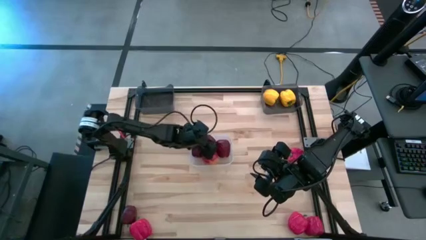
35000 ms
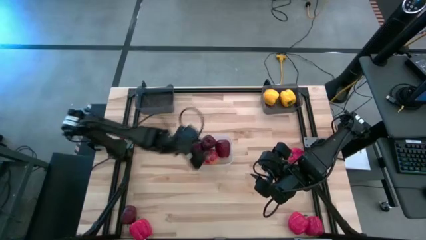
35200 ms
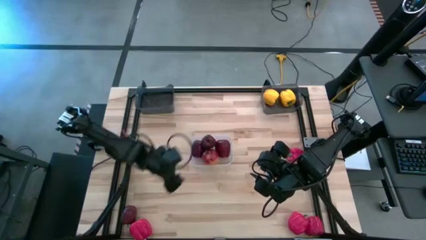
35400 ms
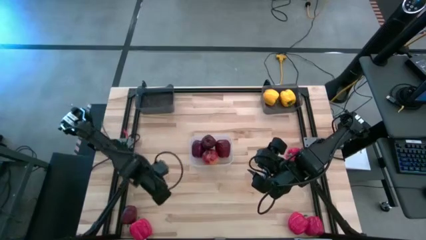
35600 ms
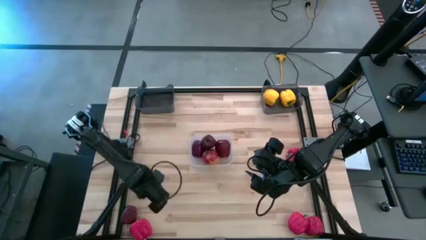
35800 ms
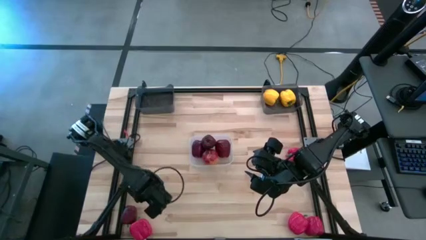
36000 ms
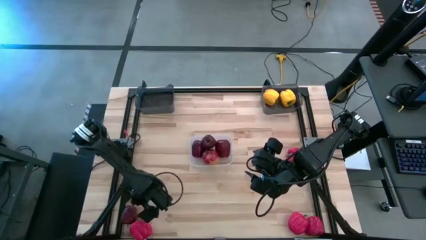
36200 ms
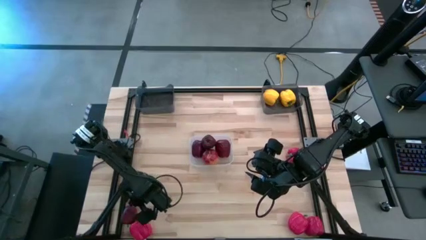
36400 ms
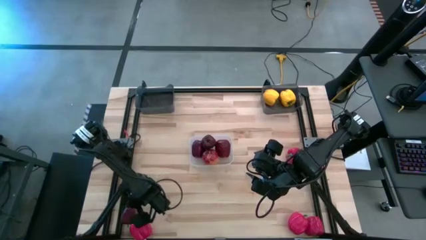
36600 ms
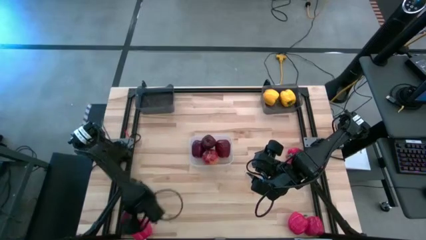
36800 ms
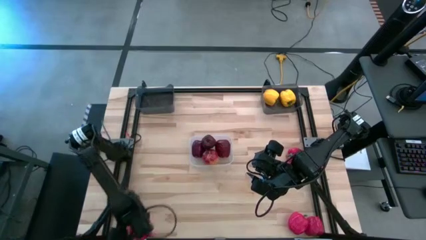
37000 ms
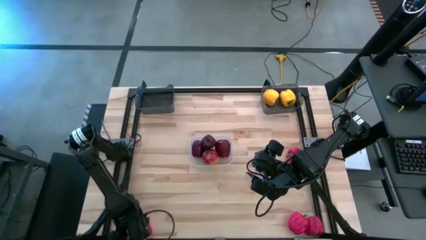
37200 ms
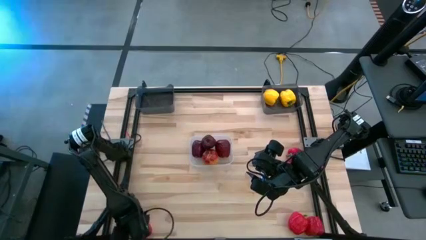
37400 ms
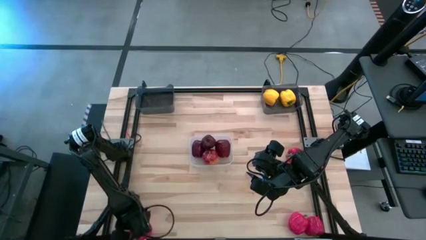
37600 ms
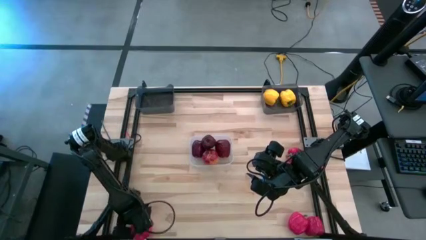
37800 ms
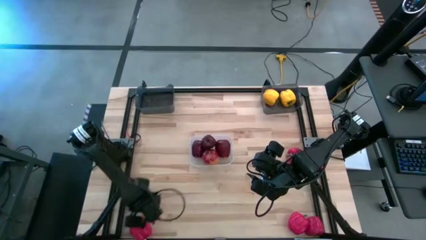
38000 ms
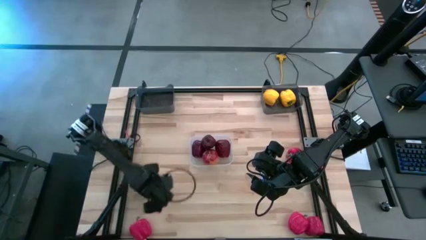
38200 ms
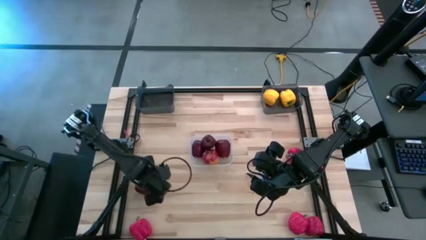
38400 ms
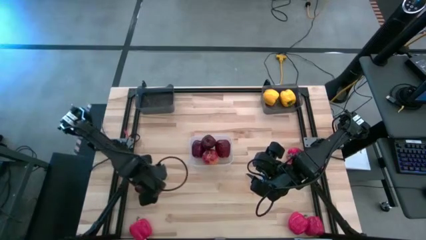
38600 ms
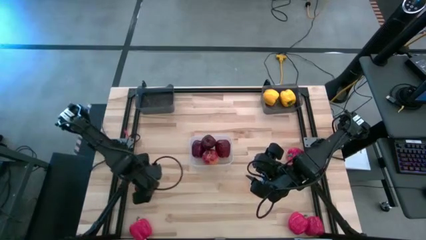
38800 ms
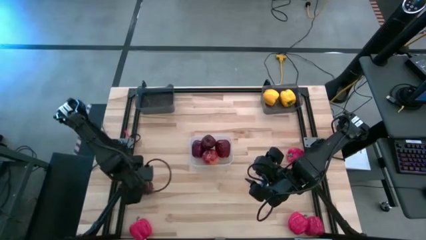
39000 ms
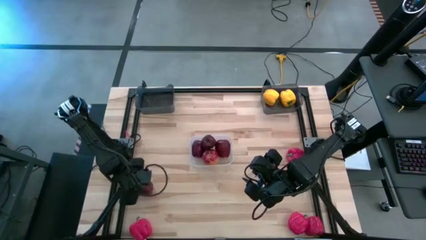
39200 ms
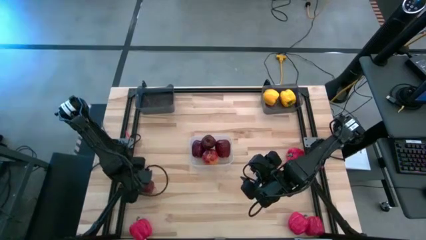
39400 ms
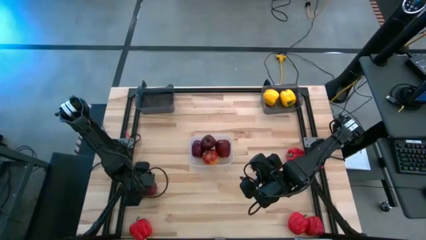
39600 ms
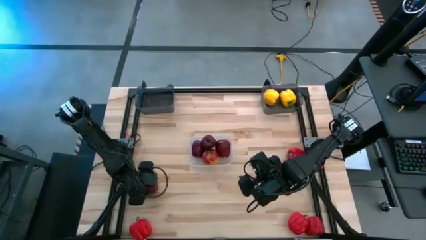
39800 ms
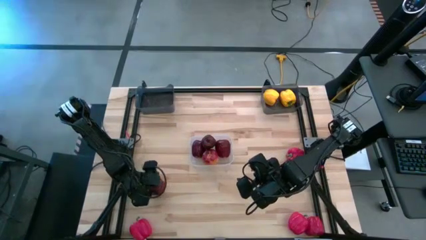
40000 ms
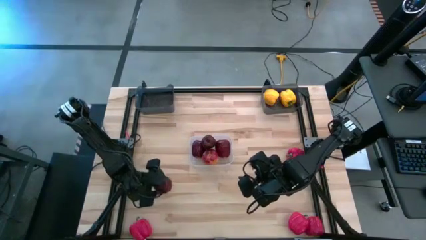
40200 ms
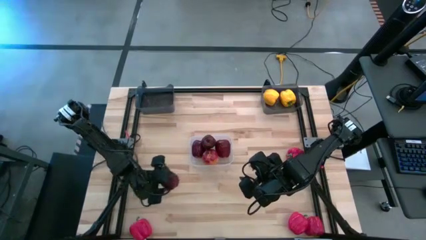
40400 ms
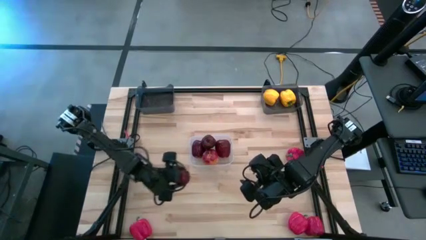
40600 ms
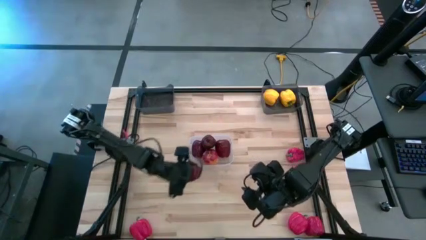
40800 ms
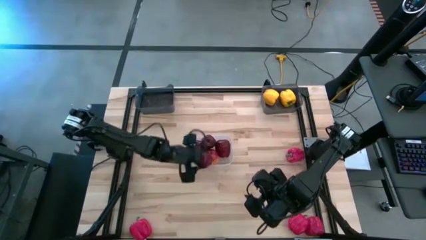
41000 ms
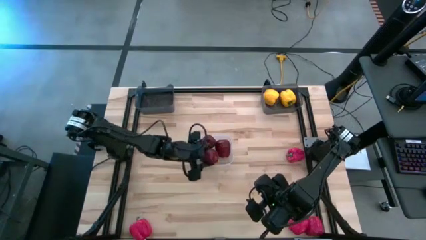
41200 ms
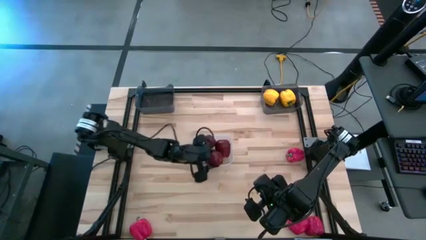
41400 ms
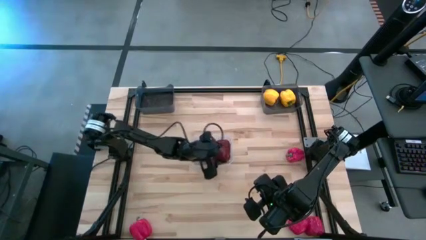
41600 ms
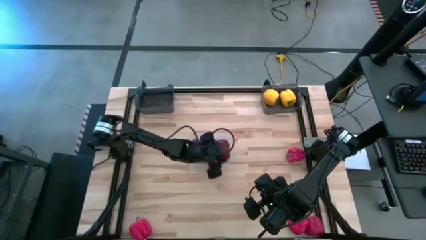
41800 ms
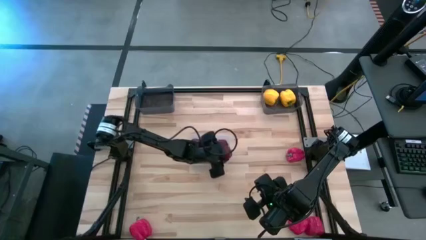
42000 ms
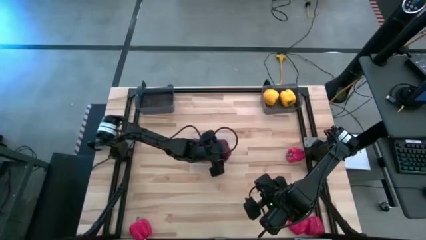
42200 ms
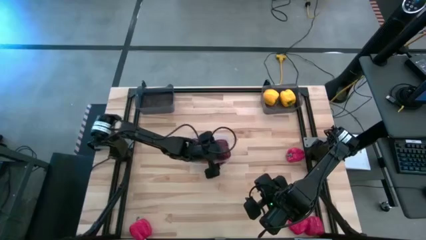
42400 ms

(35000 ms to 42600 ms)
Task: Sort produce into baskets
Put the red apple into the transparent bin

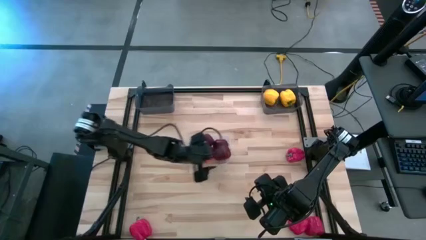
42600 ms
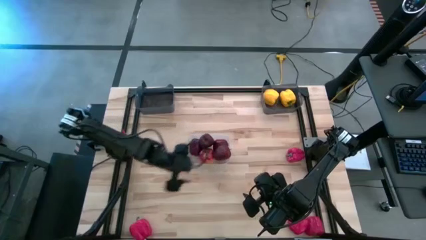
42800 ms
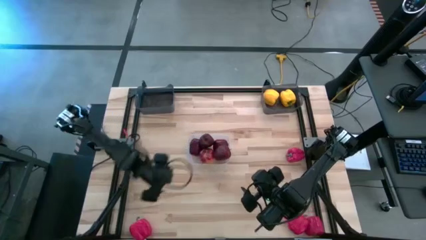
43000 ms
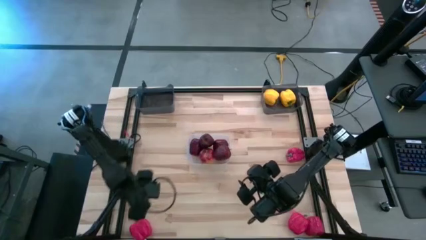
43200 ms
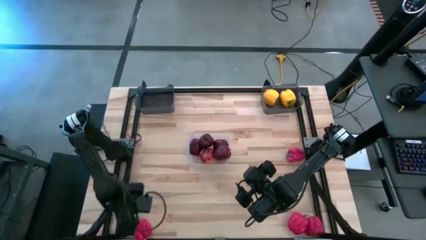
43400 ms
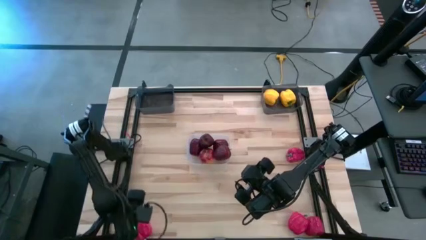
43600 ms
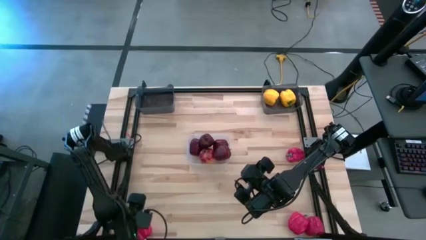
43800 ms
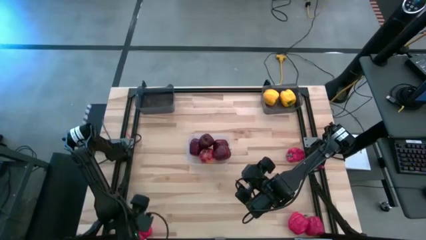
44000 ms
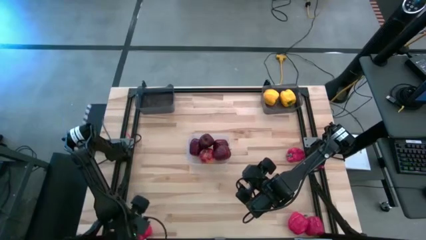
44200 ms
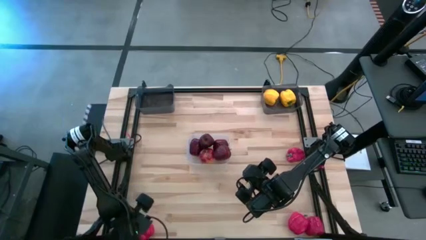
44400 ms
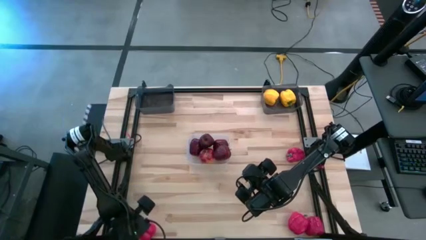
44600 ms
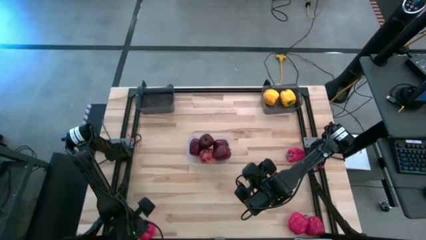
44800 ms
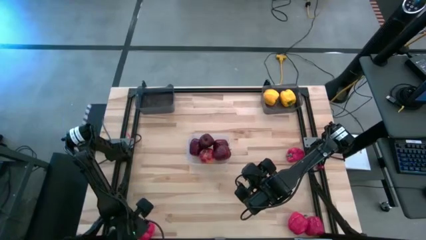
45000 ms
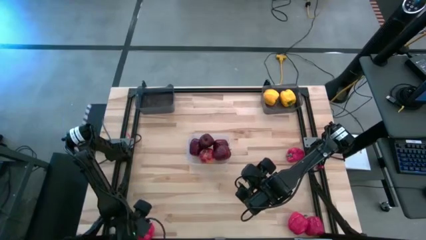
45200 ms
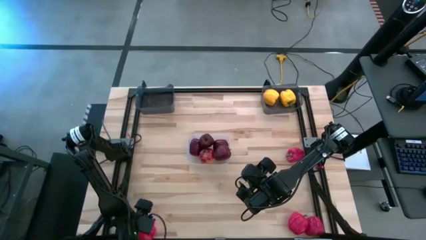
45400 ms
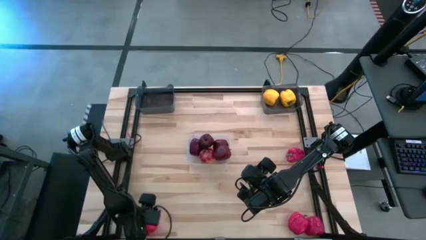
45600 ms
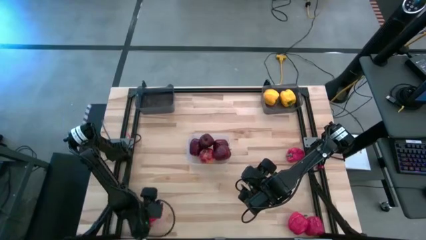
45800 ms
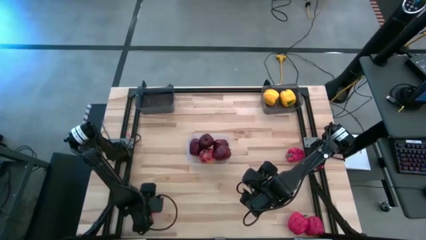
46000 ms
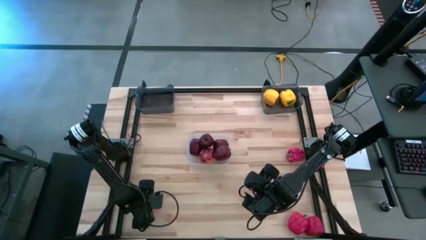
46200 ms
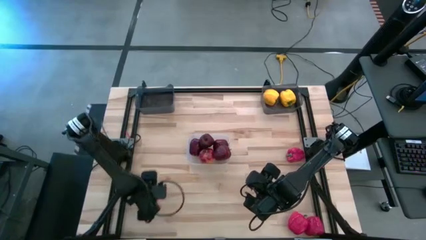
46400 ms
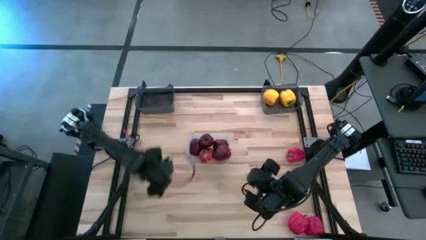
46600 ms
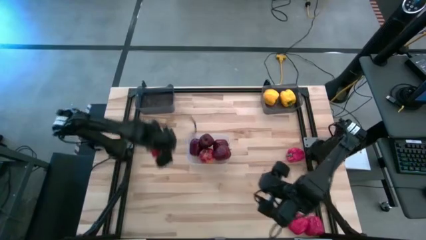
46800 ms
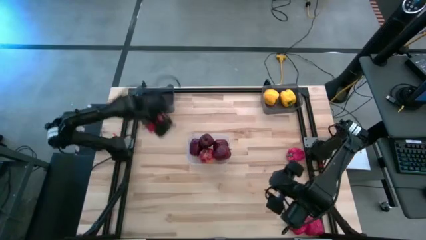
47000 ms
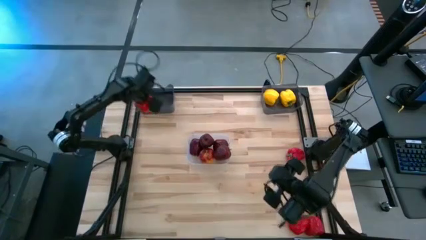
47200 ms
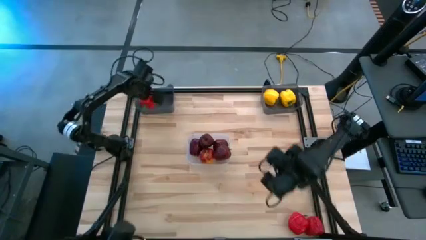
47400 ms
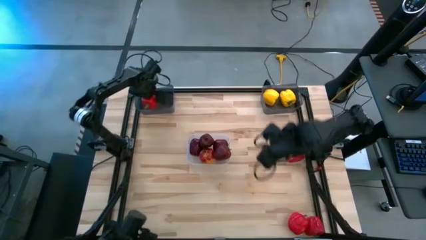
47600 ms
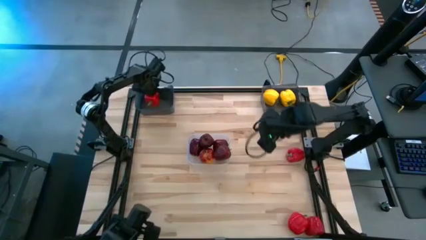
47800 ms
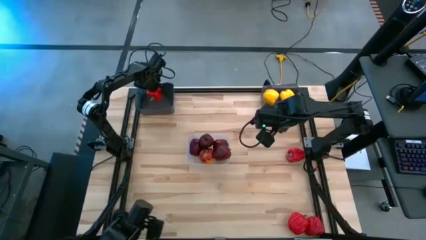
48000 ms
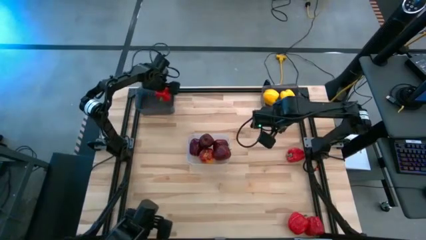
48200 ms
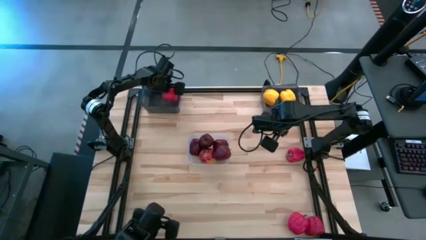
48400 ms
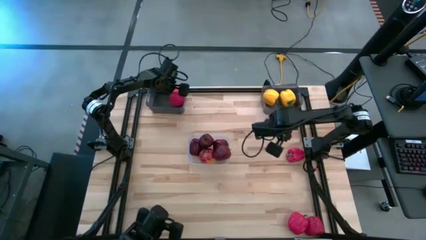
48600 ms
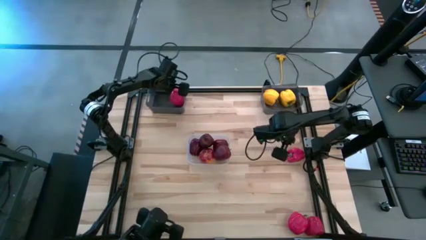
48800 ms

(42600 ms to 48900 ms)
Put the red bell pepper into the left black bin

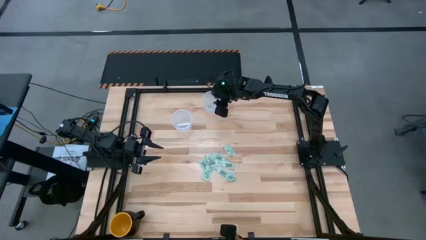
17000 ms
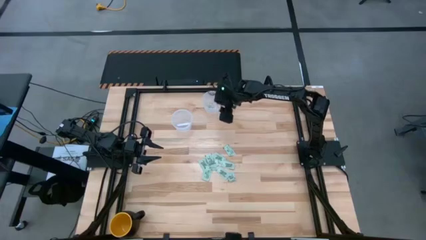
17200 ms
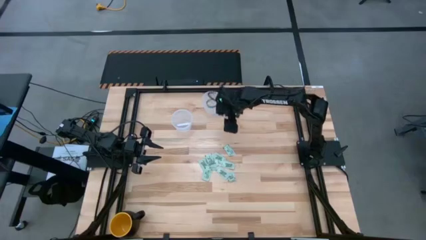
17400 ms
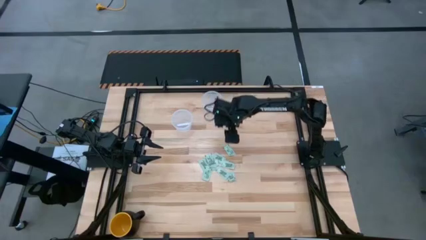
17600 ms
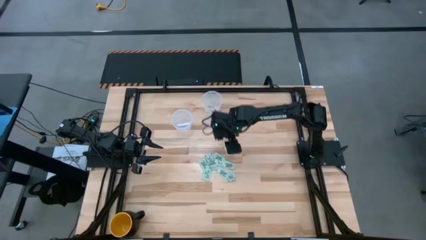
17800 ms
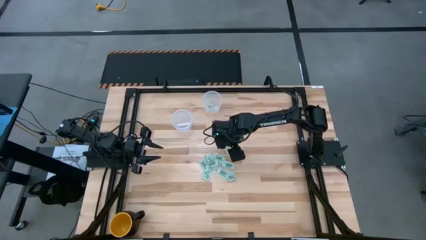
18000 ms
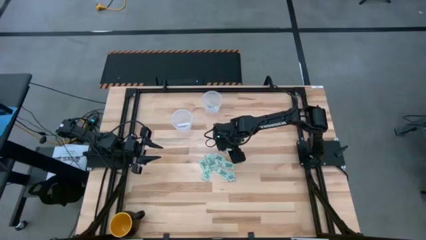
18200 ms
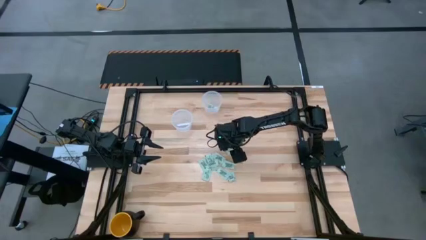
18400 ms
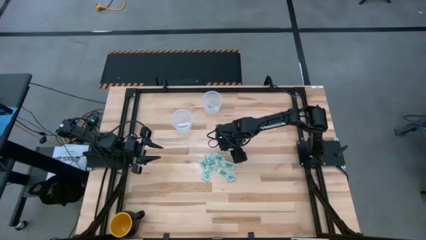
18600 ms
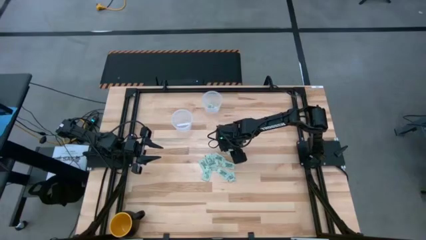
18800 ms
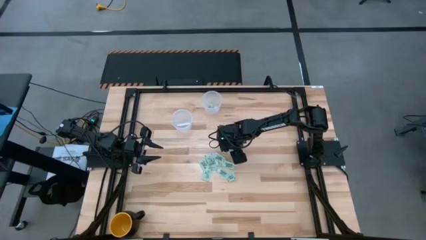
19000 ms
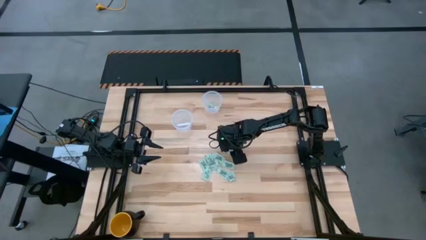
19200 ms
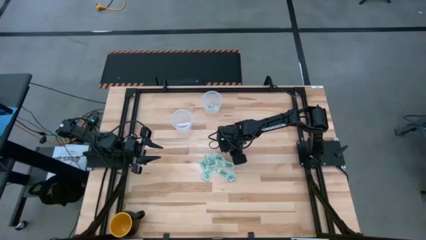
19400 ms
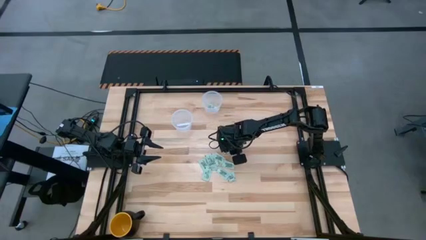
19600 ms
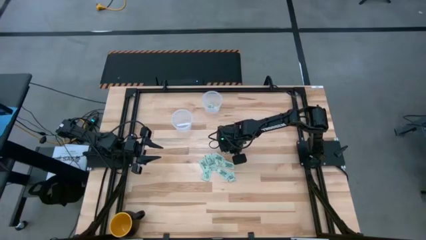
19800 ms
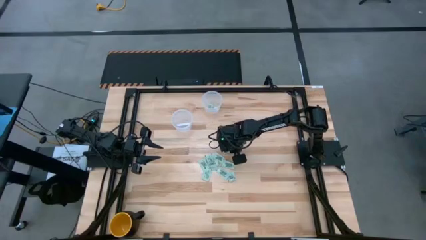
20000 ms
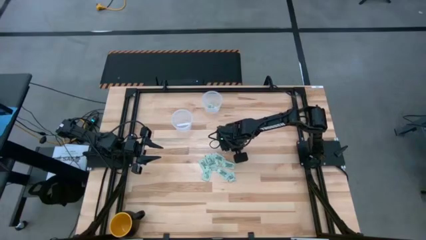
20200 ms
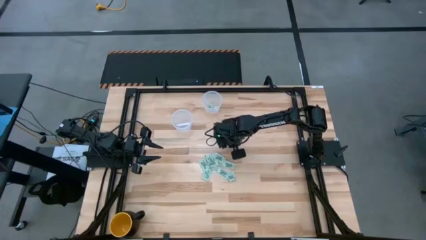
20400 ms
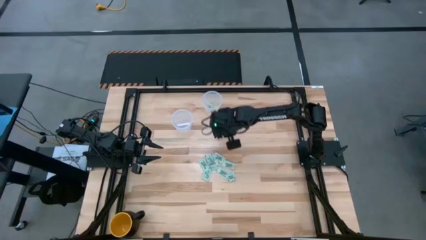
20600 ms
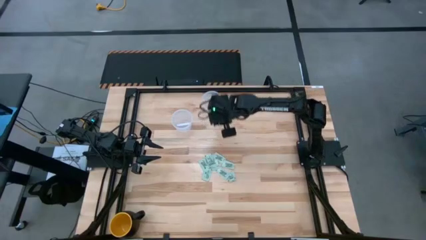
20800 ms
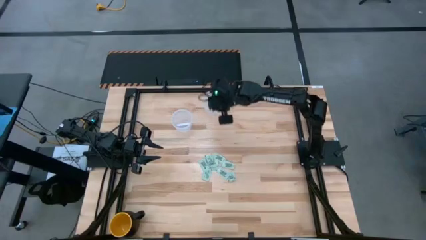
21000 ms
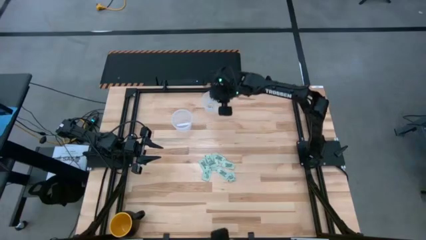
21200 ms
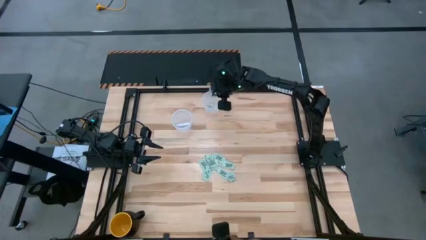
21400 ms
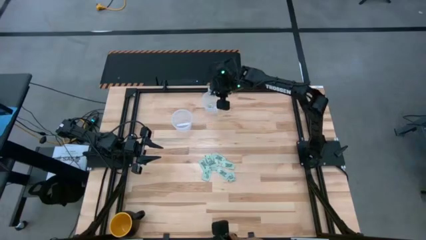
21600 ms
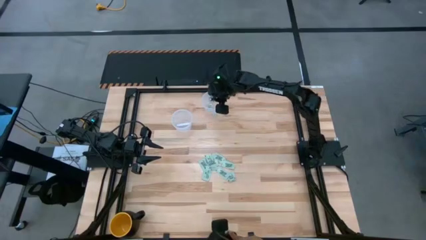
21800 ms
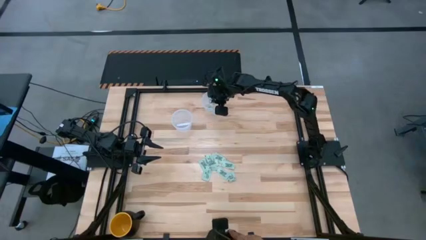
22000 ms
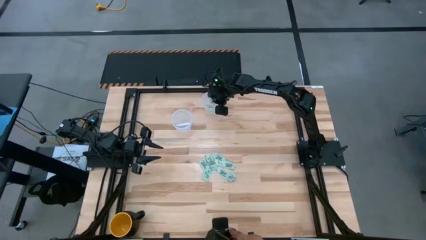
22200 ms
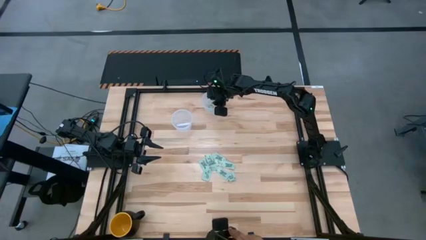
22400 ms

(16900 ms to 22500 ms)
Task: Pick and place items into bin
Put the stevia packet into the top transparent bin
